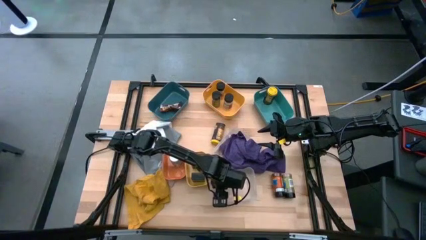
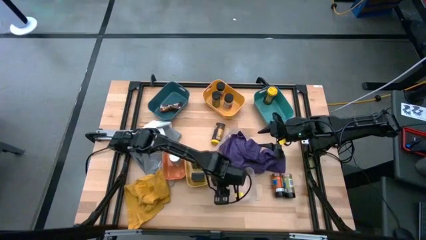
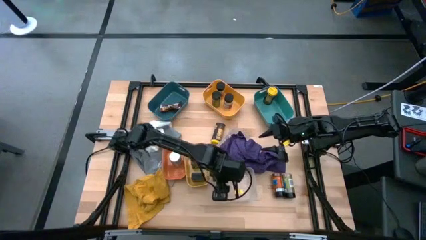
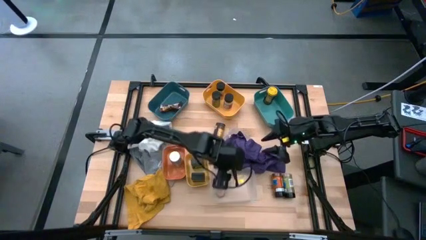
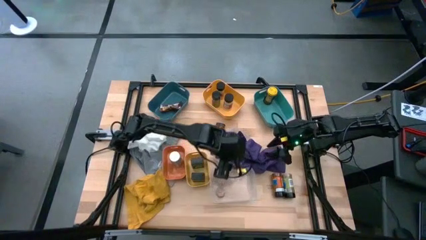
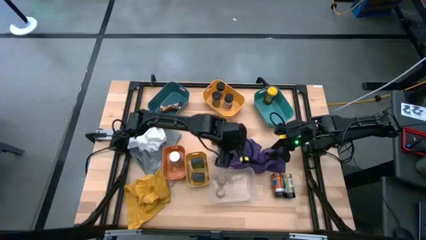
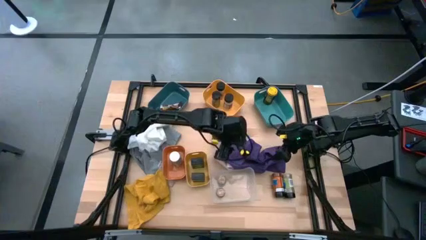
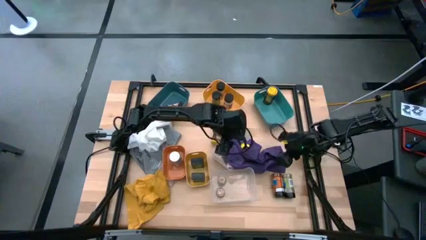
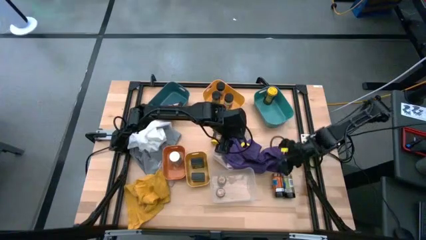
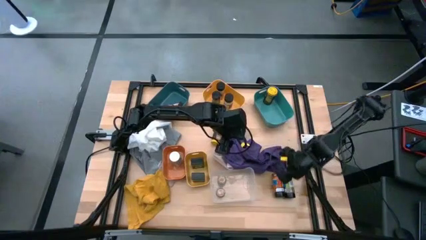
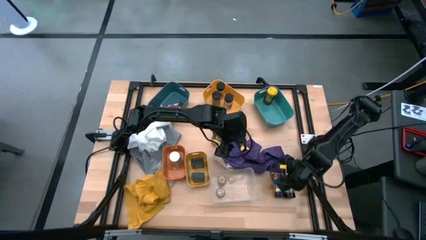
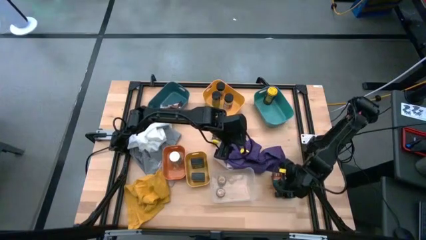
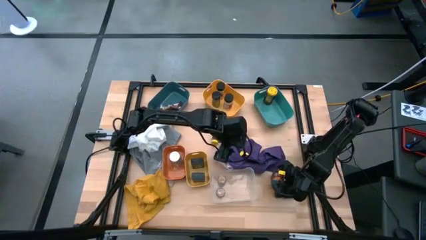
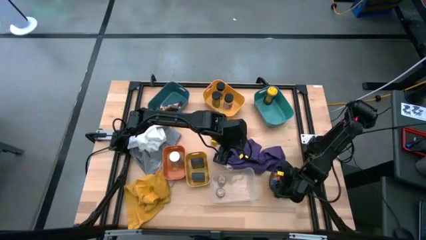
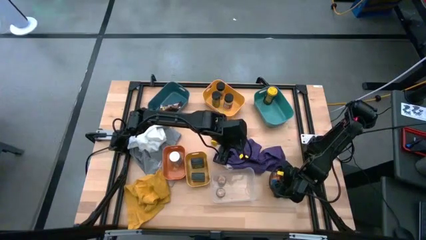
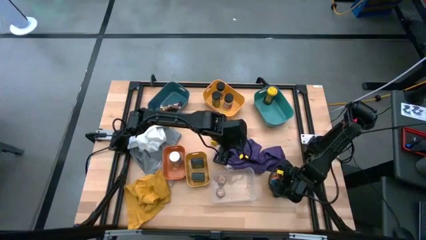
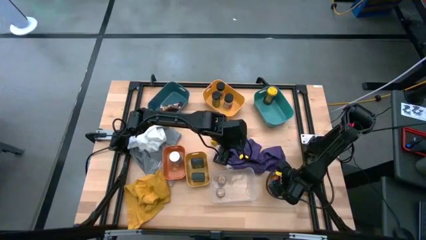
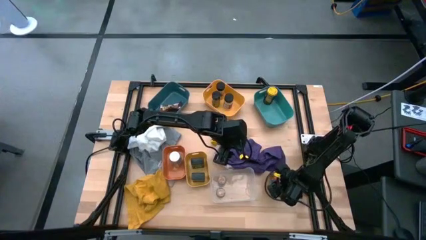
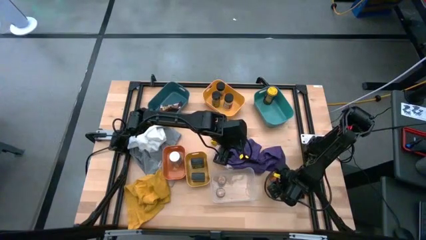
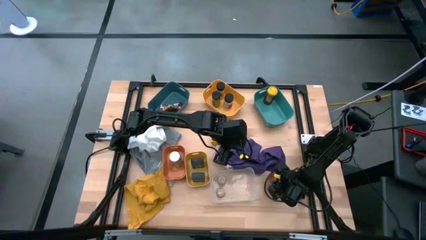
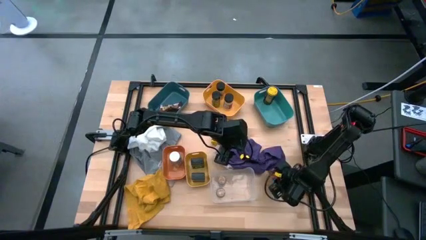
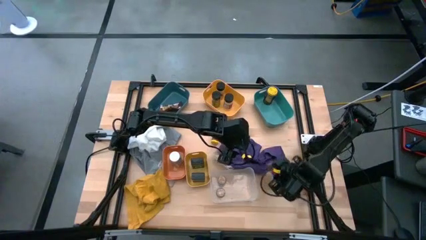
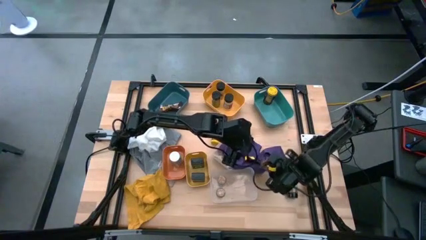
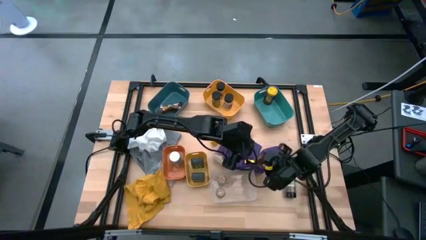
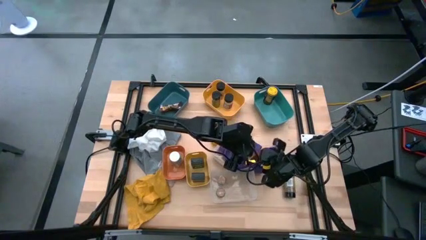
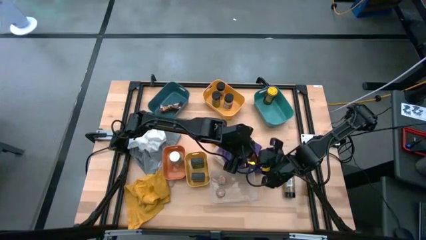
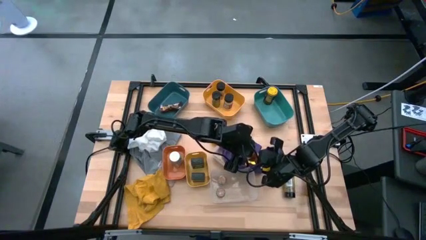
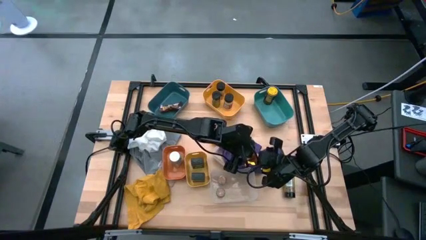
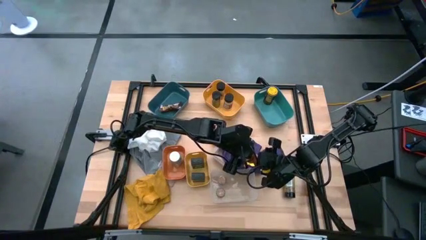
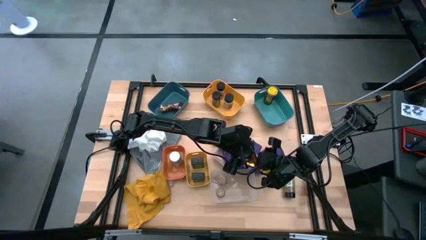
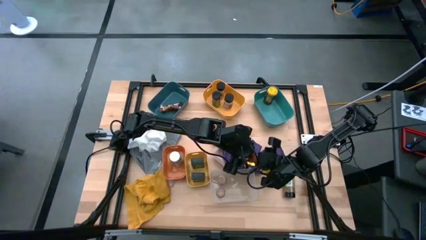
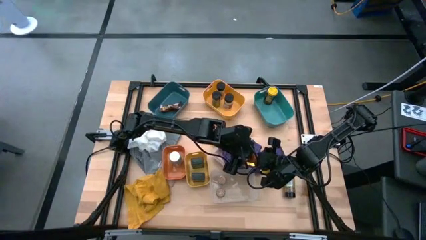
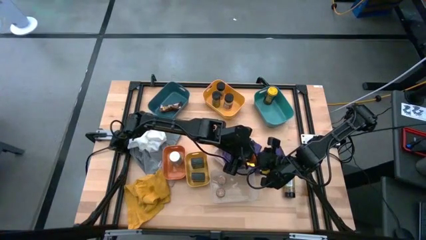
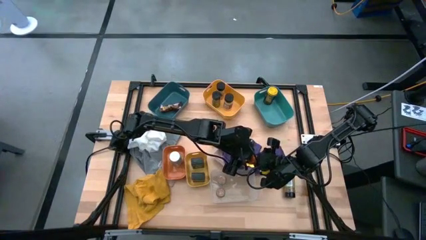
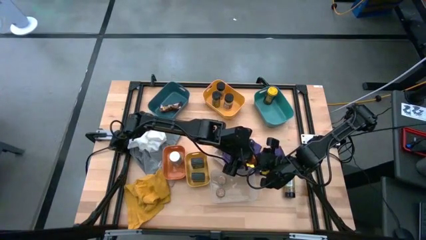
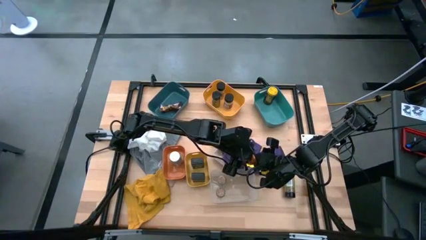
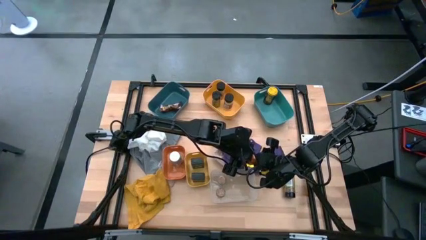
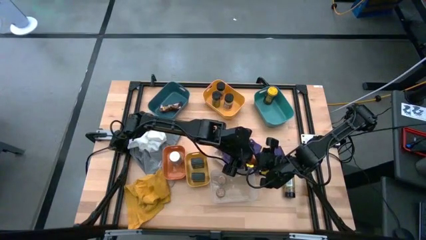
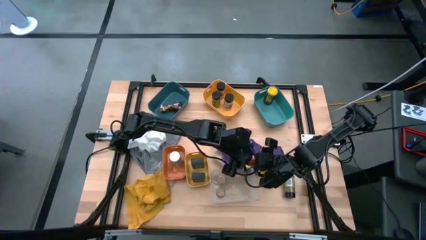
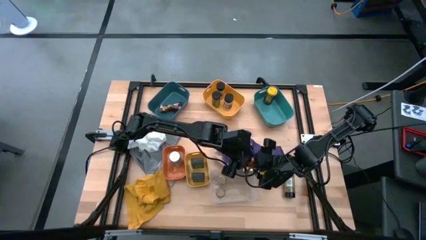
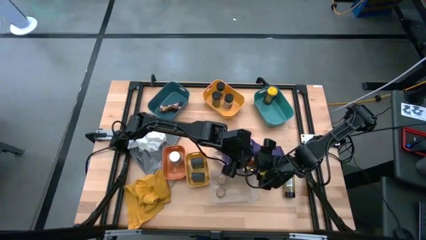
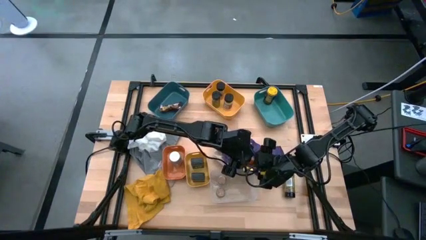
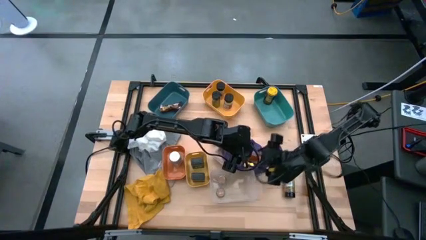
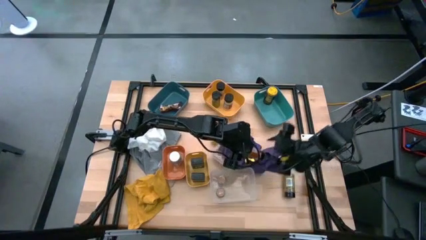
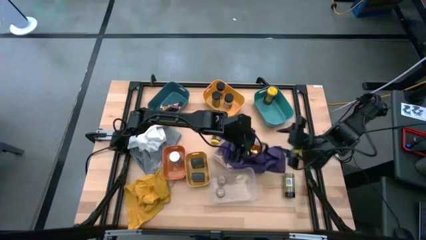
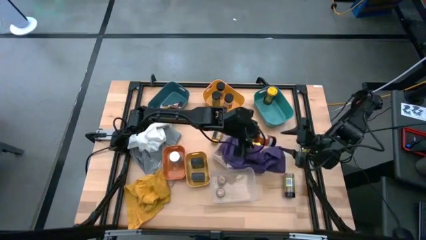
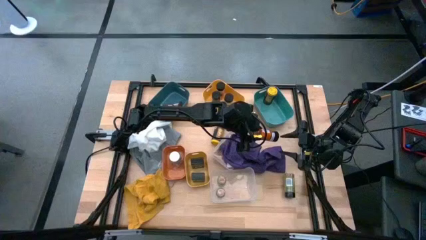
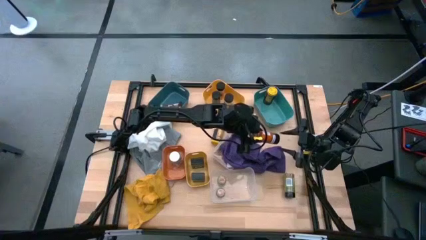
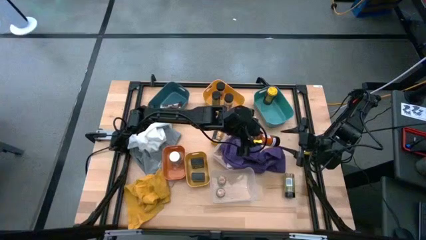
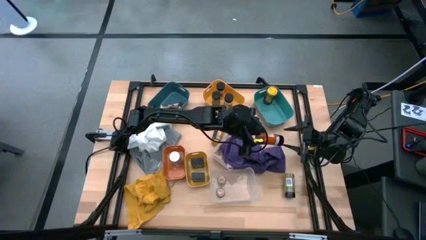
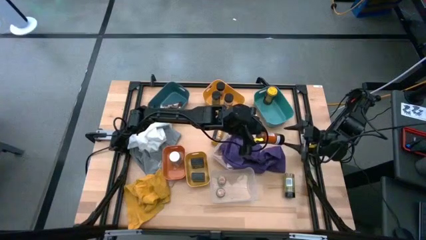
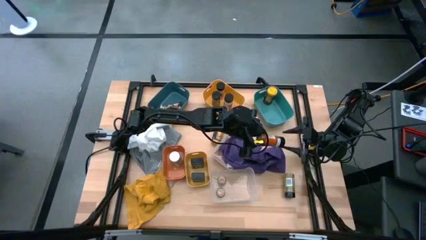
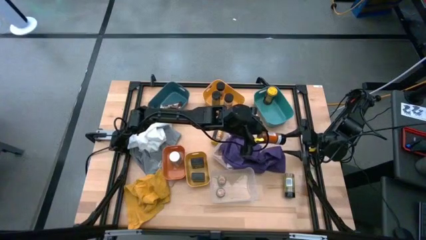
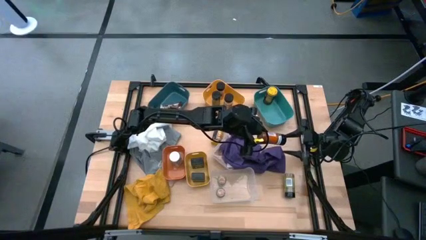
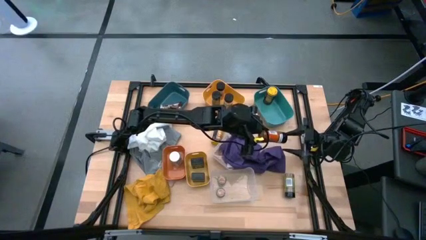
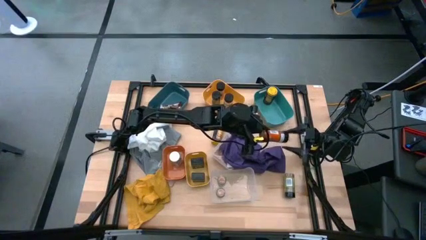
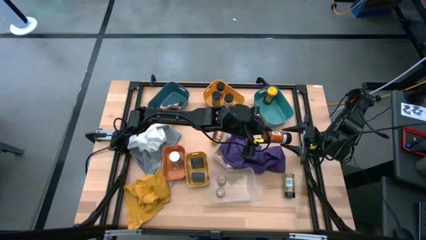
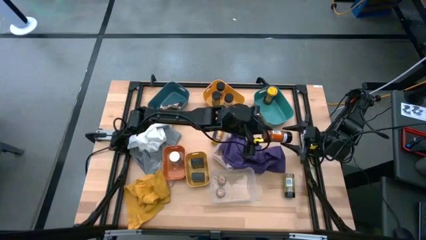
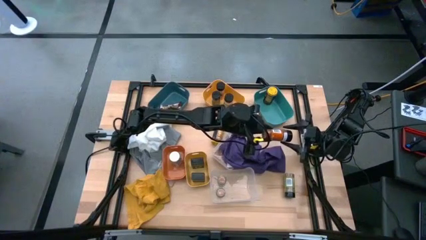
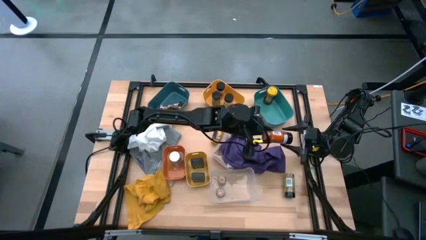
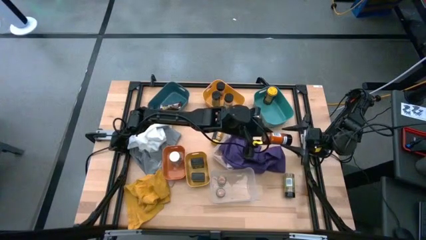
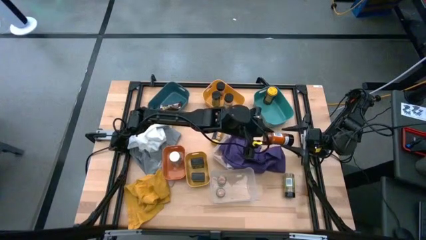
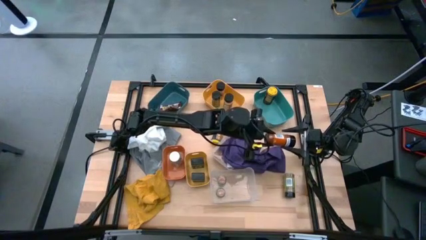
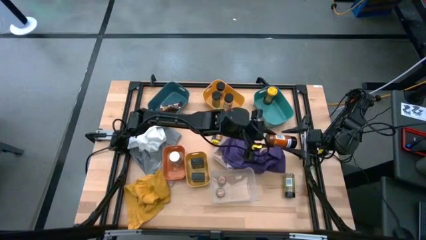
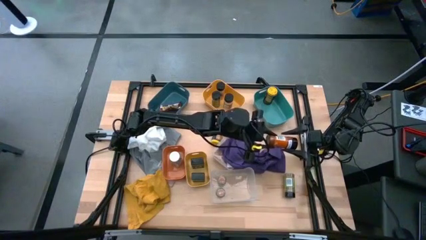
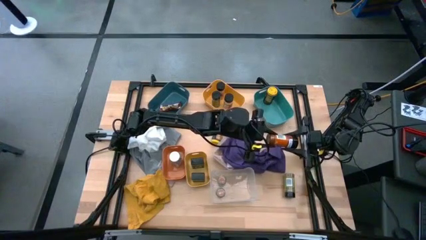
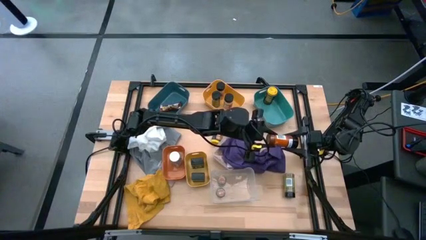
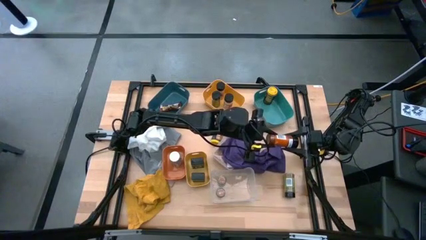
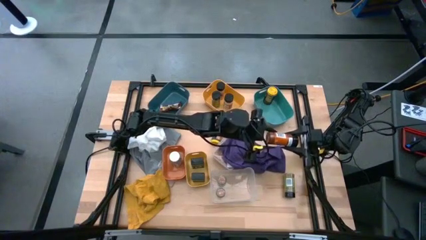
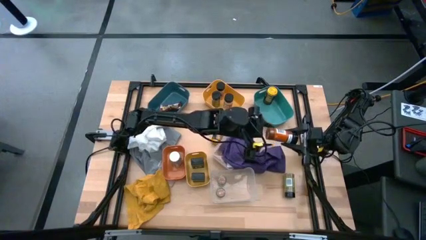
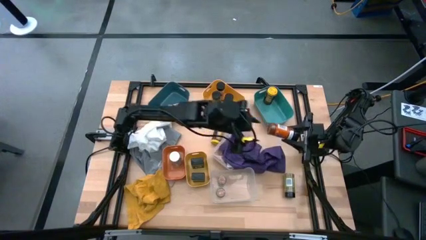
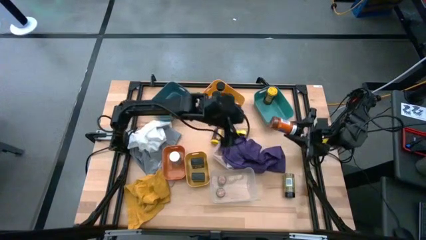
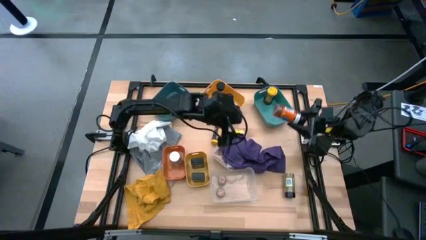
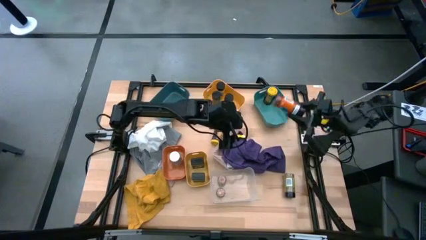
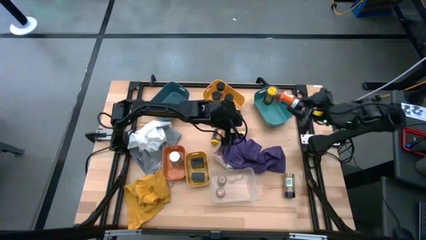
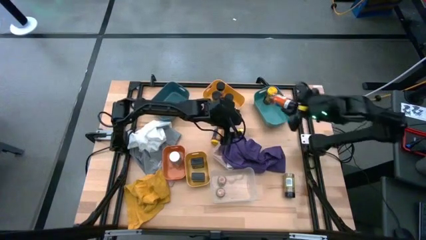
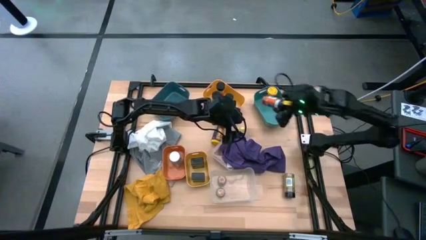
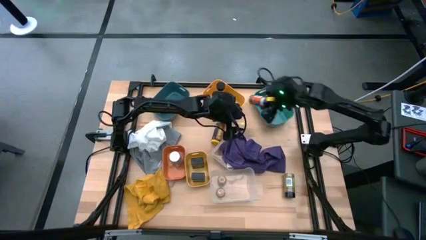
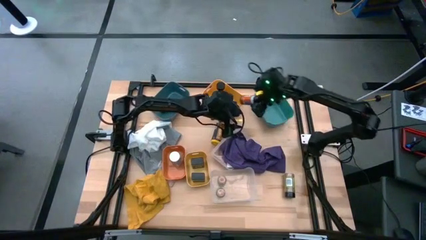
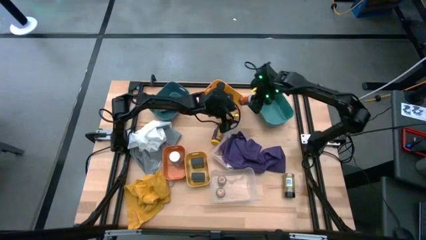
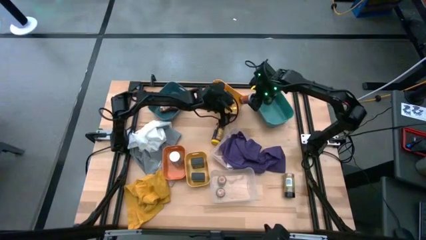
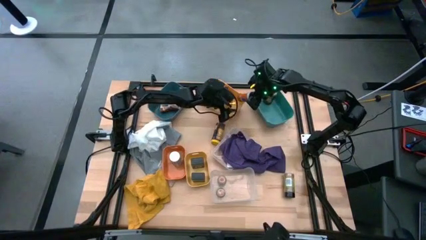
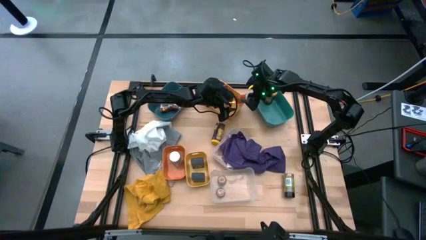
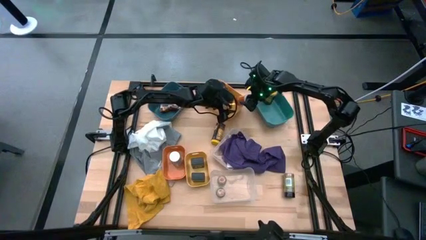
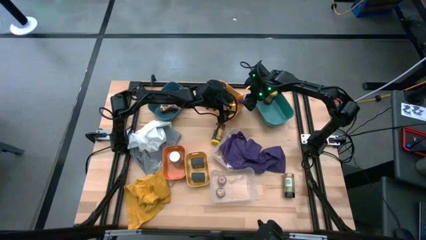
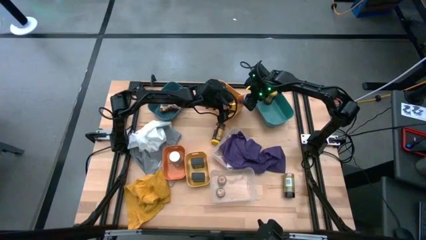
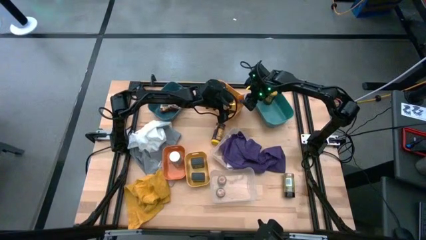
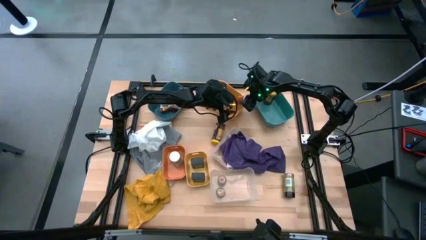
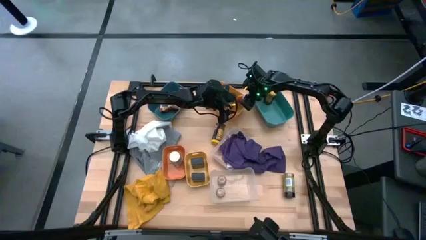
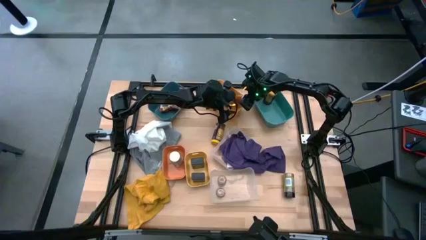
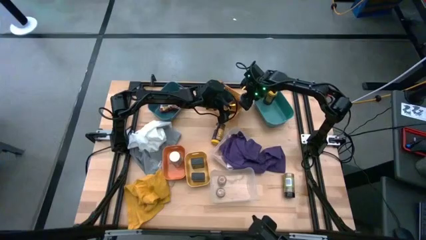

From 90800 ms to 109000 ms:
Task: Sort spices by type
Put the orange spice bottle into the yellow bin
